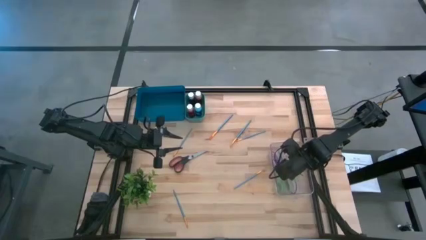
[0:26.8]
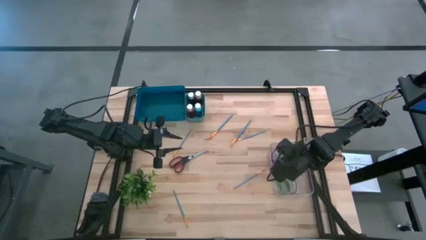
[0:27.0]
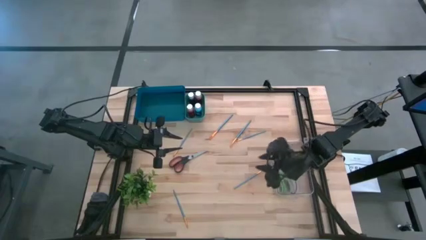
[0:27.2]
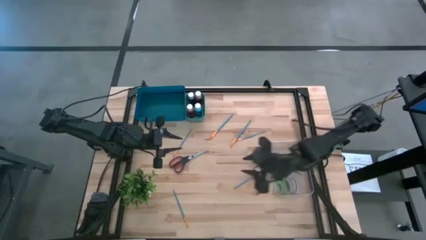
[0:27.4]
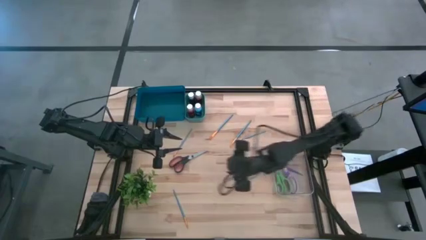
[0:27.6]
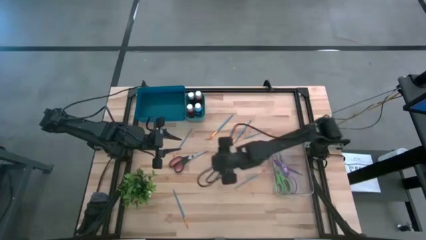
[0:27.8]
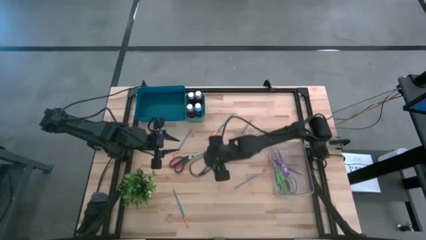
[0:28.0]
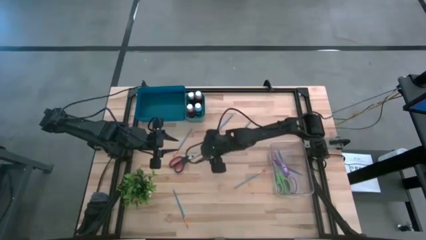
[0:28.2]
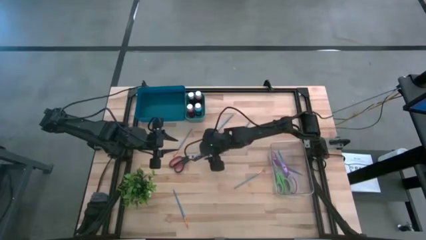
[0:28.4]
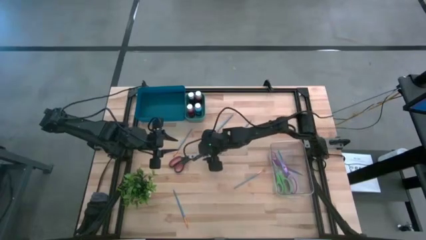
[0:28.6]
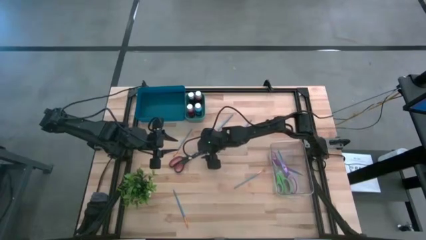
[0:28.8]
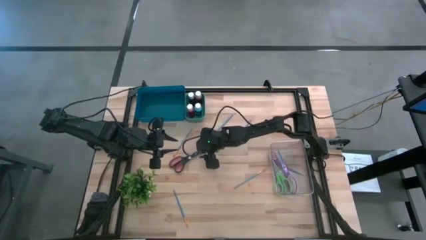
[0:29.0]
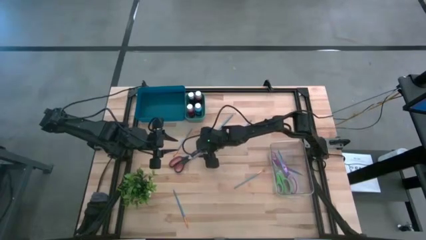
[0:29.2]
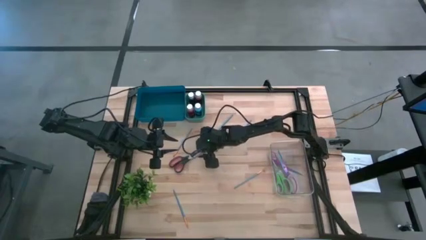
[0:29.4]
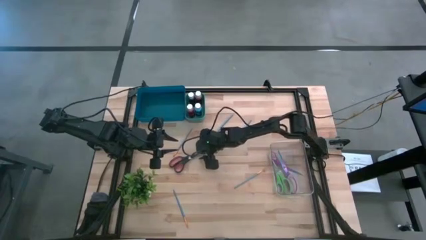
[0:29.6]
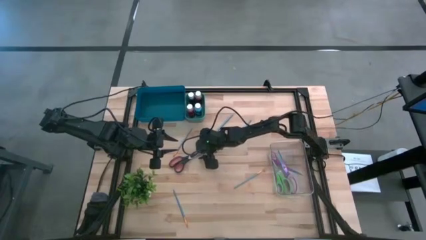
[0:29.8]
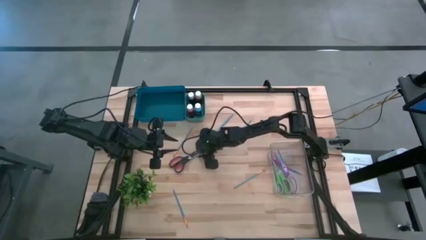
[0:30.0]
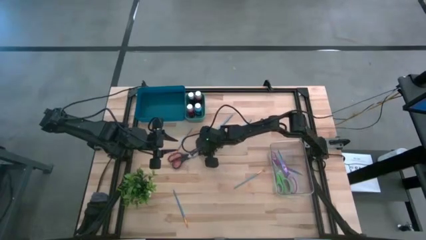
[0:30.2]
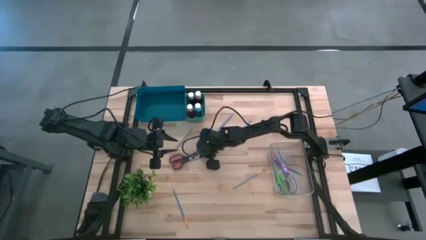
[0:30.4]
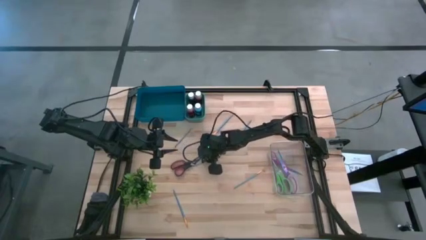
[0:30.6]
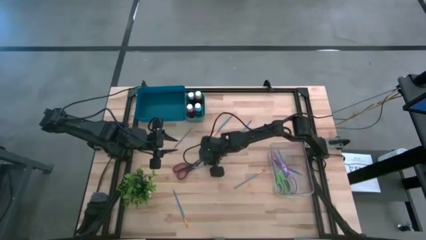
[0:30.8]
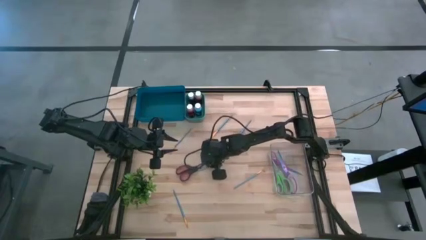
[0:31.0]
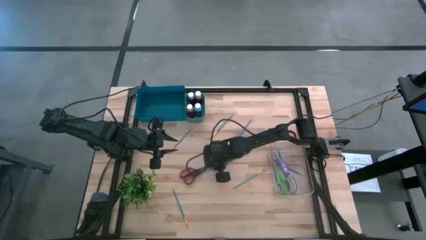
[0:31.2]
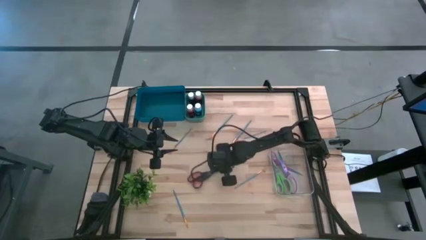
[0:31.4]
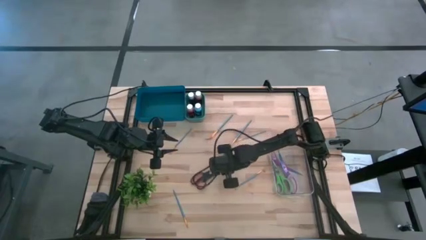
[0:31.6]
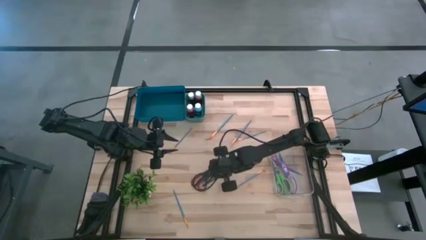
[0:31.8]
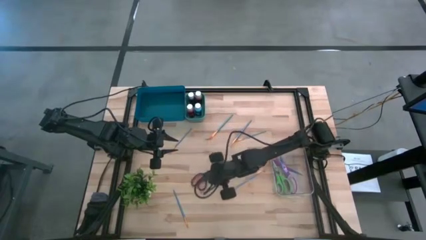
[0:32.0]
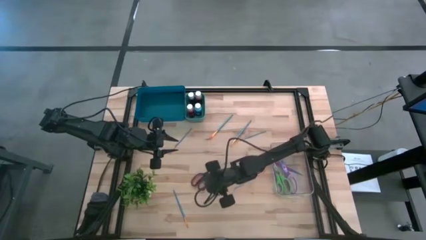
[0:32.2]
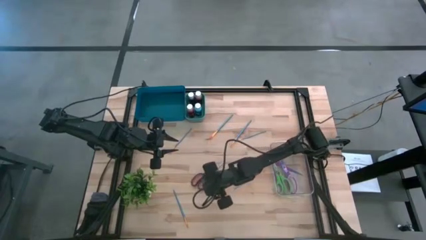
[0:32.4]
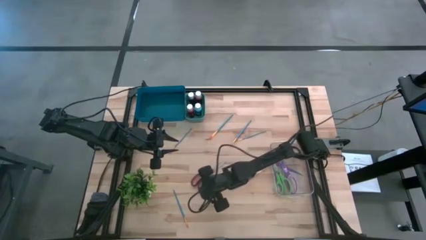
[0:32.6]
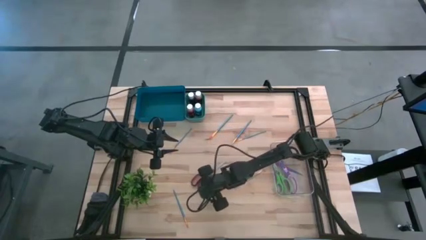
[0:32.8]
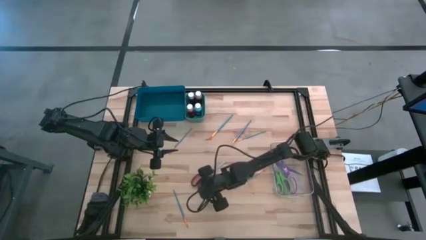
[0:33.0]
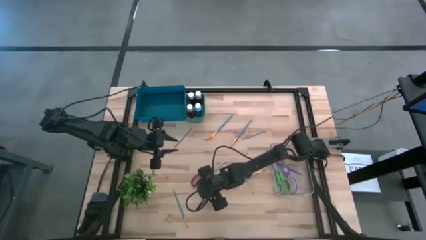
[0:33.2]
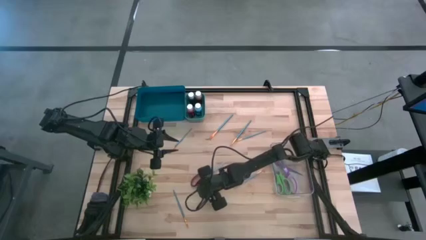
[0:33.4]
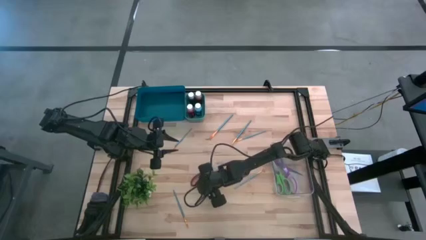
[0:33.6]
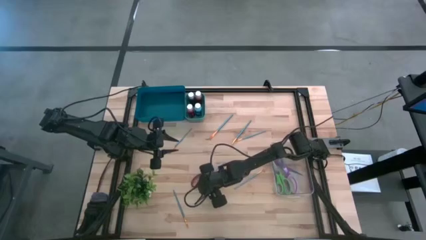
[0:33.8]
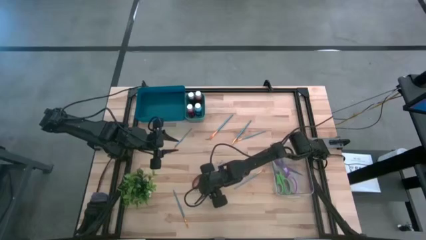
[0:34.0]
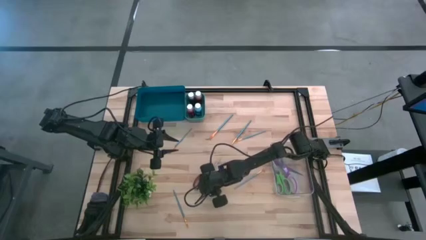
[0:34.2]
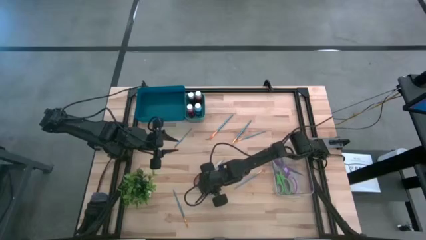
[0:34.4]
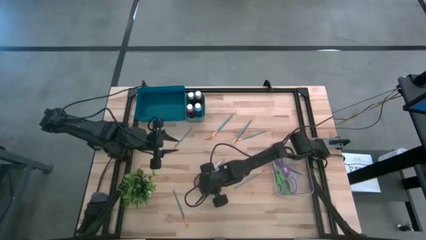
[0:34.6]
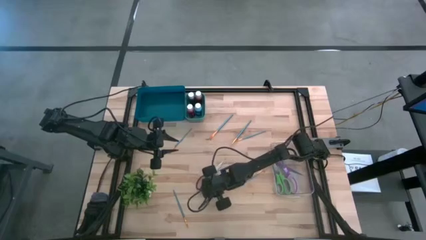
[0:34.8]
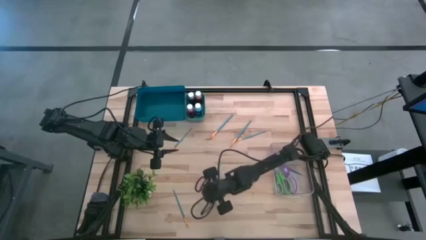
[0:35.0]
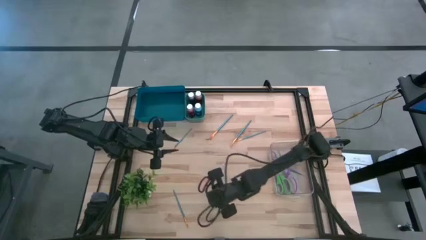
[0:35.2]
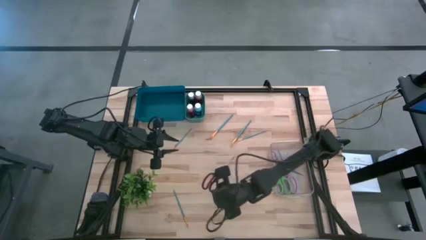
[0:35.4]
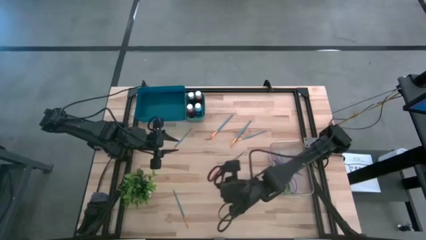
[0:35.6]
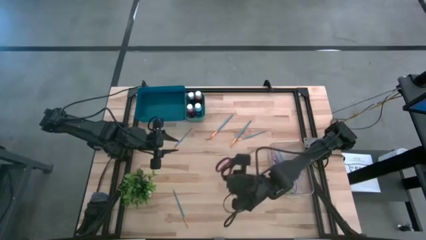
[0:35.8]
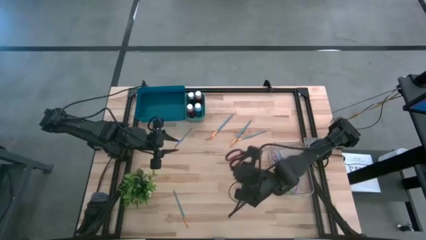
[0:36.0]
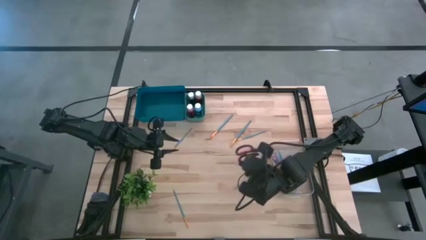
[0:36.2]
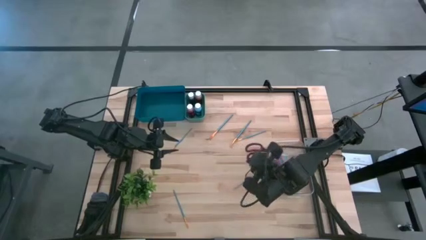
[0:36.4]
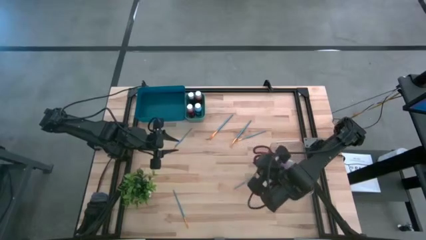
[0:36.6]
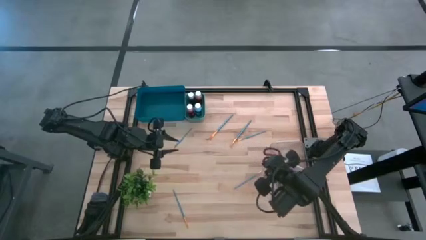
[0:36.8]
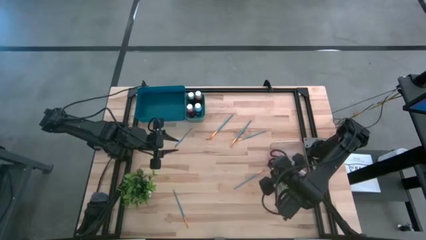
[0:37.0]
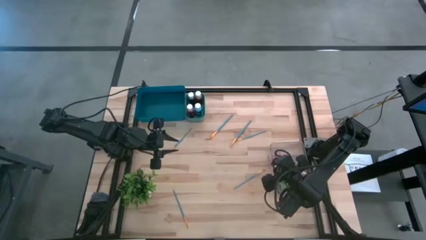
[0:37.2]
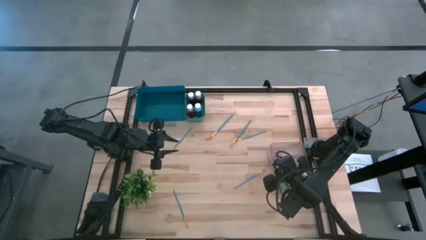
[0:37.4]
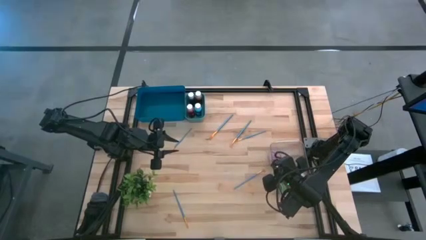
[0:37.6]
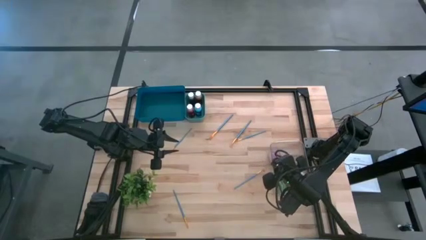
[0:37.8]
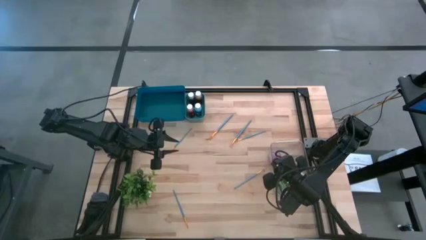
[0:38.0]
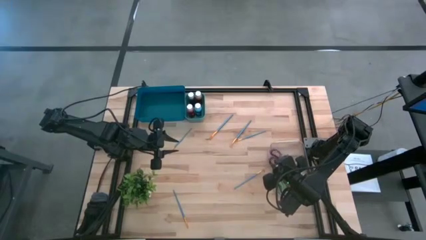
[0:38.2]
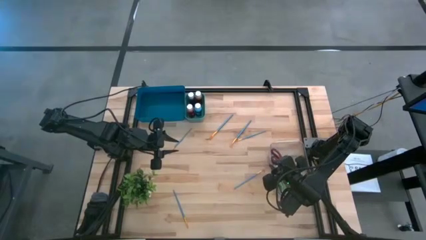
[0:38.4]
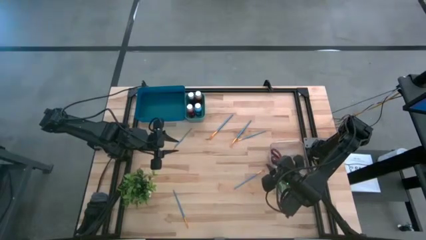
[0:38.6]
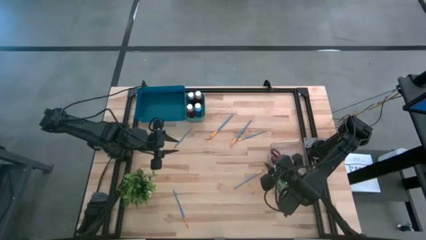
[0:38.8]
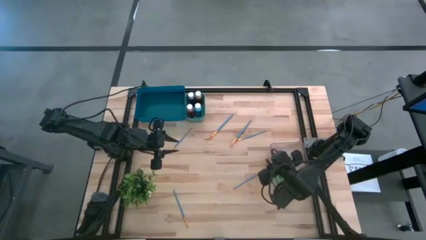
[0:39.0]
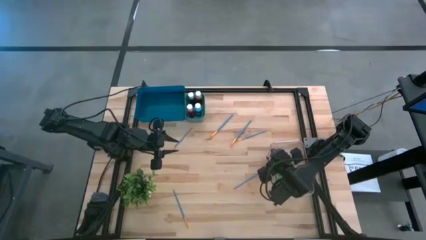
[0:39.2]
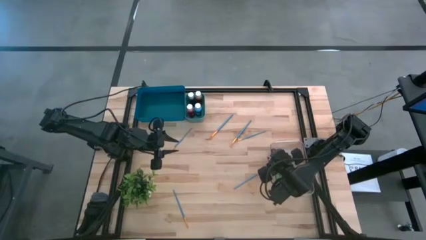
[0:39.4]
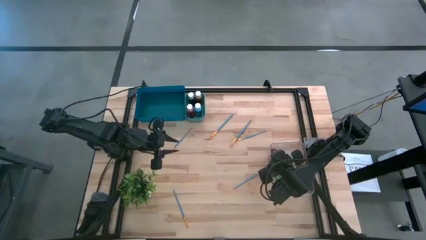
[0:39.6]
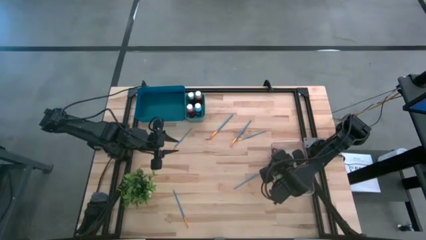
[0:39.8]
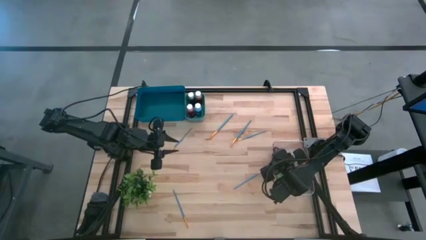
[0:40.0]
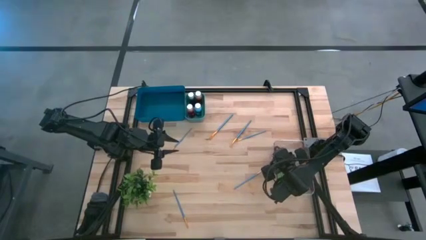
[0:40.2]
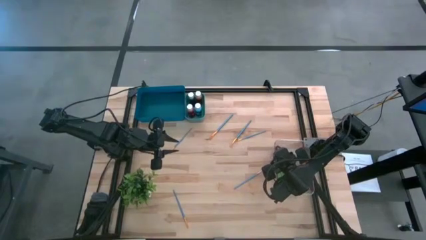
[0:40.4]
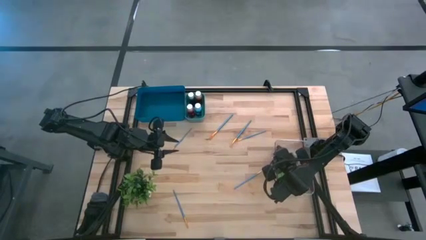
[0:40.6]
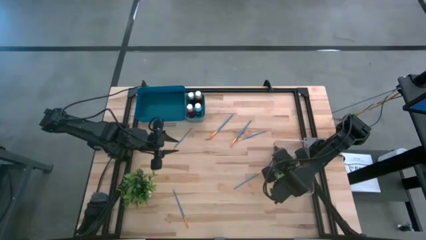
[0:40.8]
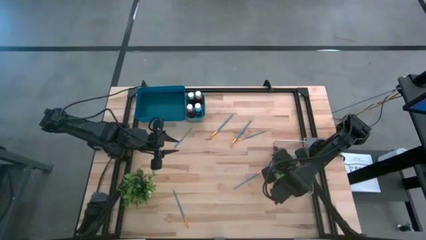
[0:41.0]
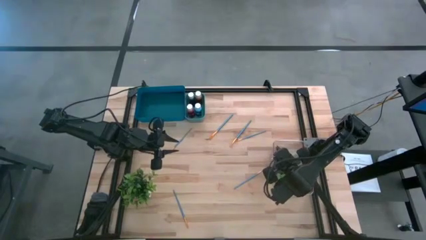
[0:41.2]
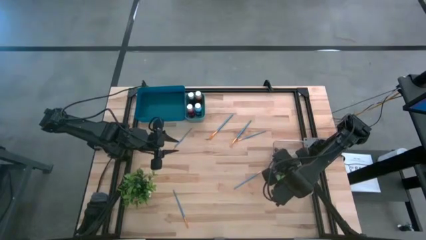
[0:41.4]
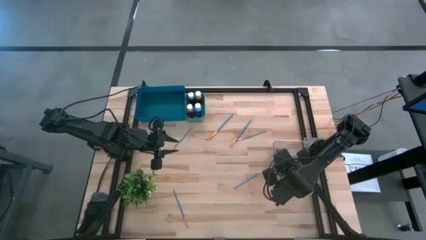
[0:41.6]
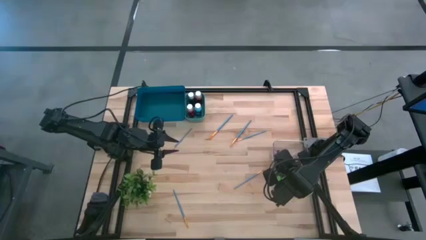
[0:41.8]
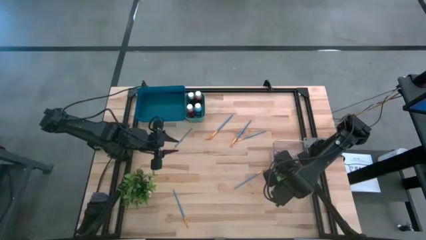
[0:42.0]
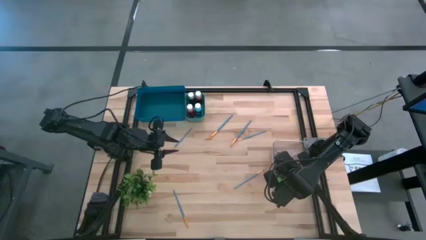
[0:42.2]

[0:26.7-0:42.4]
Task: Pick & Place Paint Supplies
Put the black scissors into the transparent bin

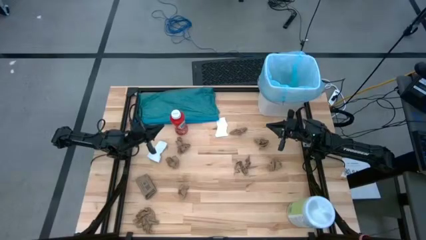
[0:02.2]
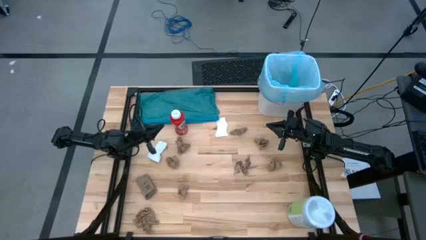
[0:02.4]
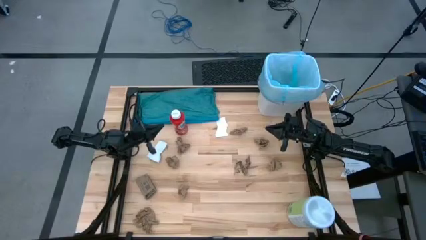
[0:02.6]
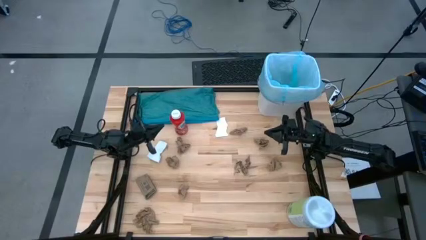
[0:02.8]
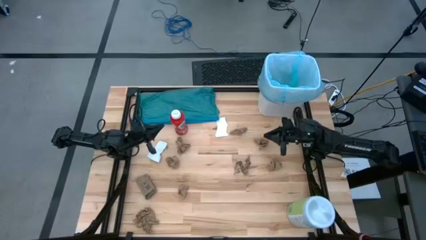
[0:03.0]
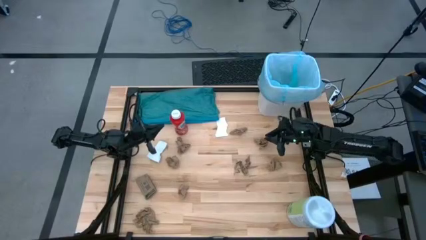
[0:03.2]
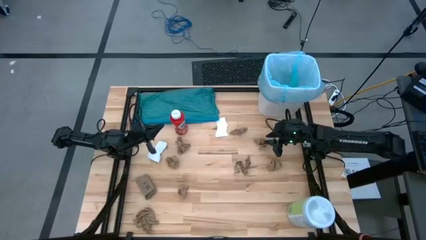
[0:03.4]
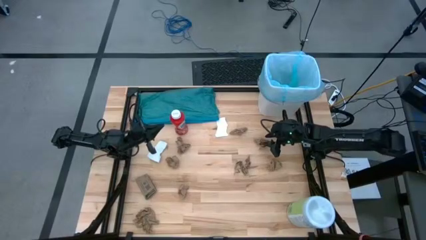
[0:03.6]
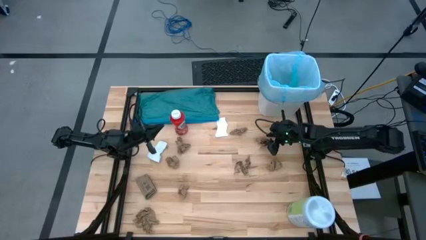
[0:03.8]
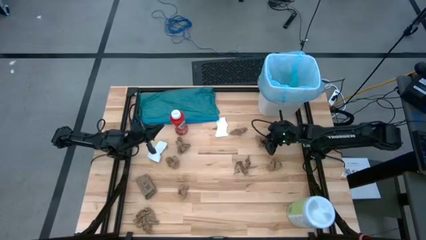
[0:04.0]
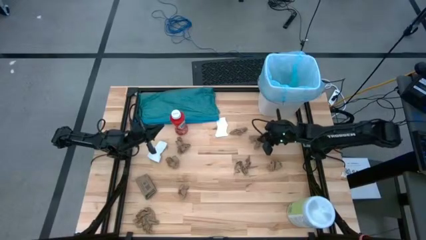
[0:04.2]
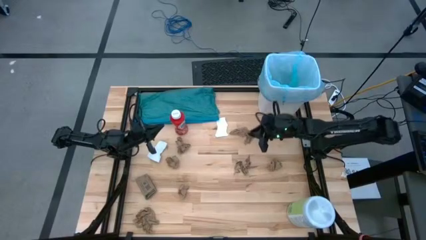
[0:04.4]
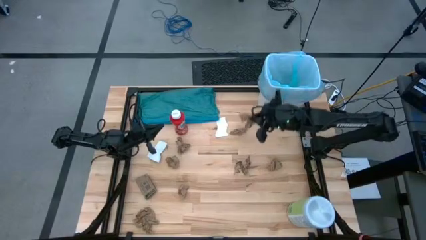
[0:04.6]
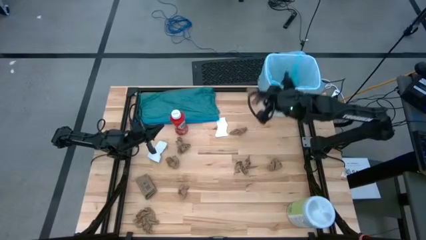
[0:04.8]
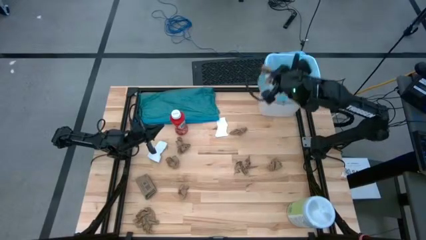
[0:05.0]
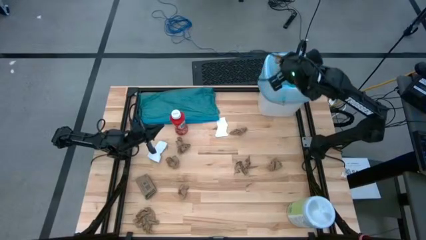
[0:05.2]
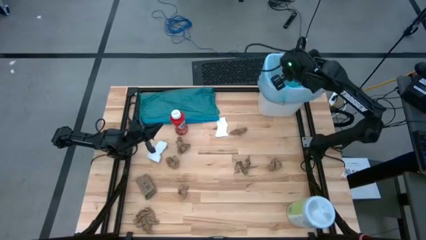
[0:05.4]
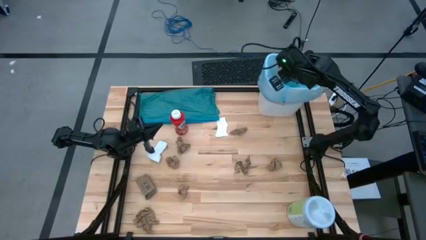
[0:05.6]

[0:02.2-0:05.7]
Task: place trash/remove bag and relplace
Put the brown napkin into the blue trash bin
